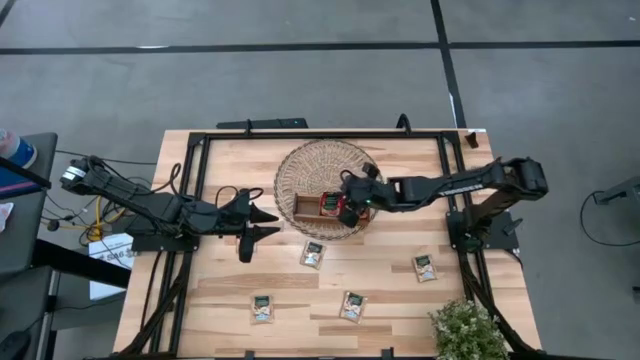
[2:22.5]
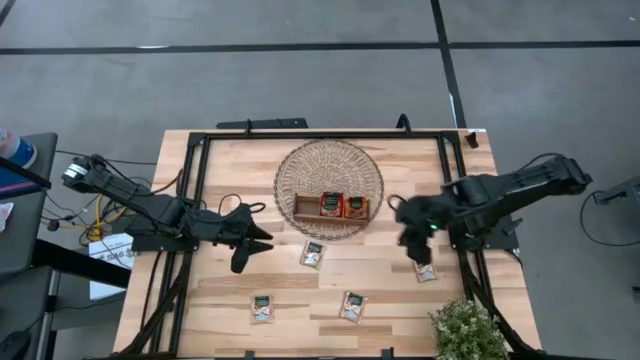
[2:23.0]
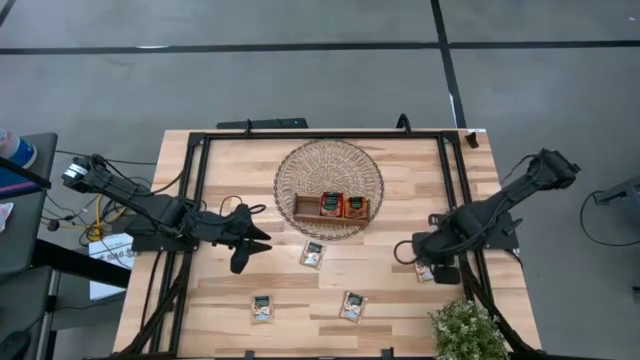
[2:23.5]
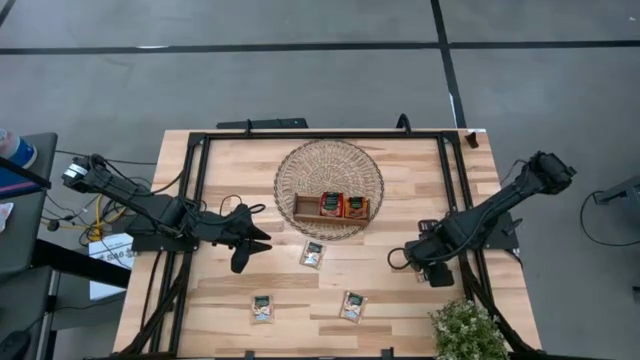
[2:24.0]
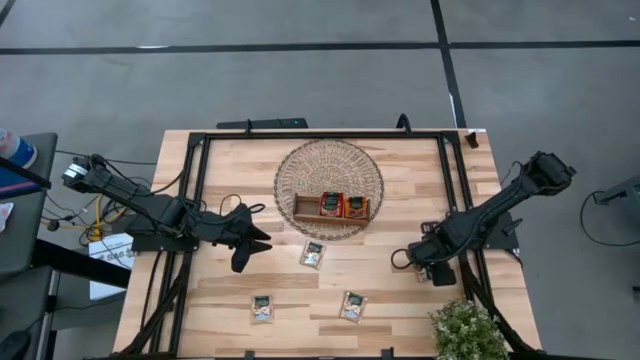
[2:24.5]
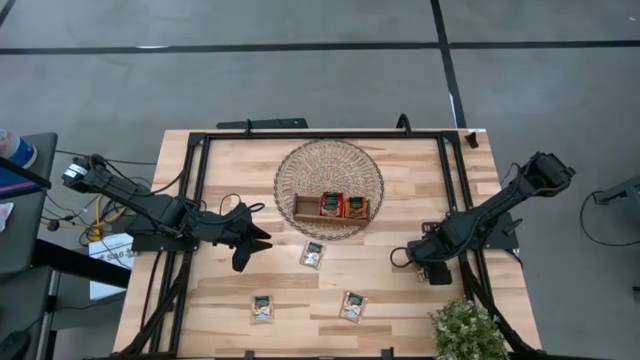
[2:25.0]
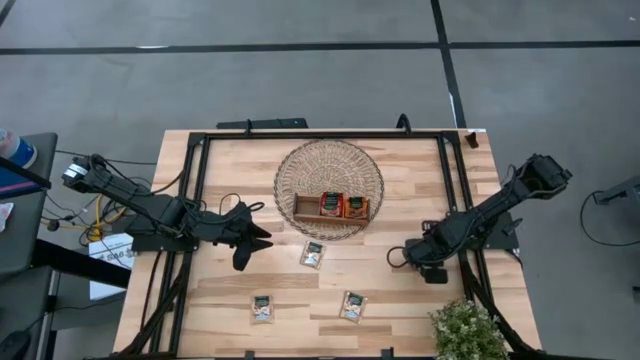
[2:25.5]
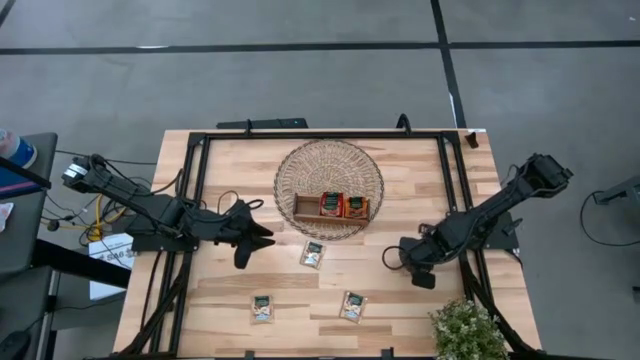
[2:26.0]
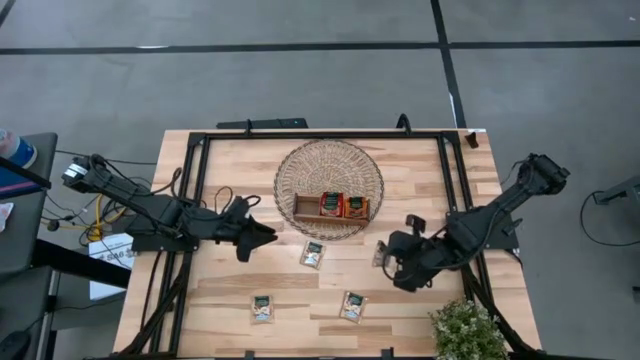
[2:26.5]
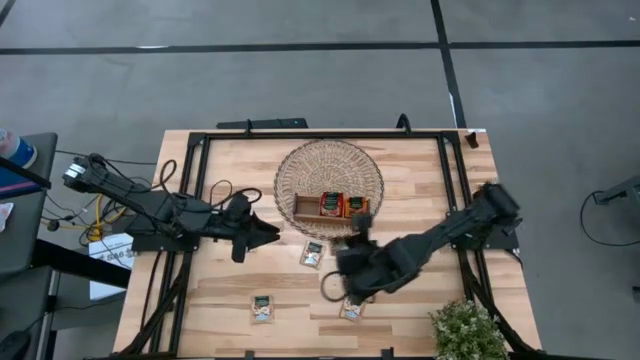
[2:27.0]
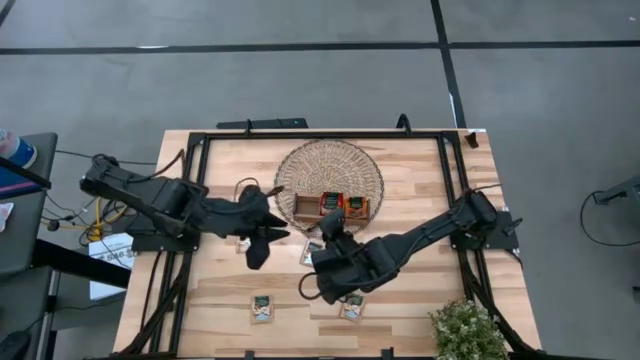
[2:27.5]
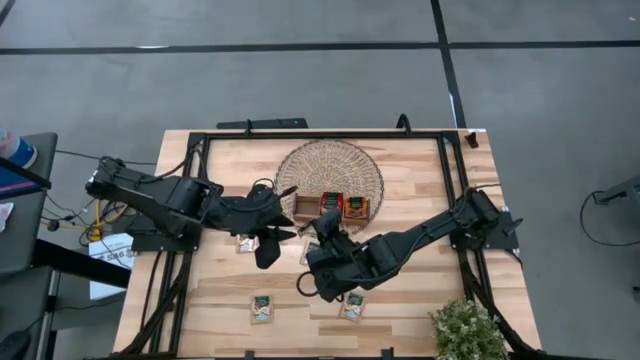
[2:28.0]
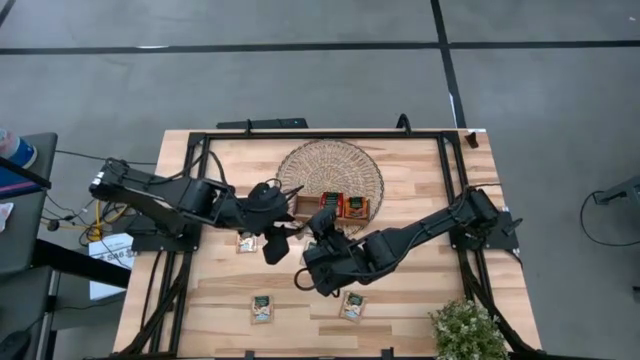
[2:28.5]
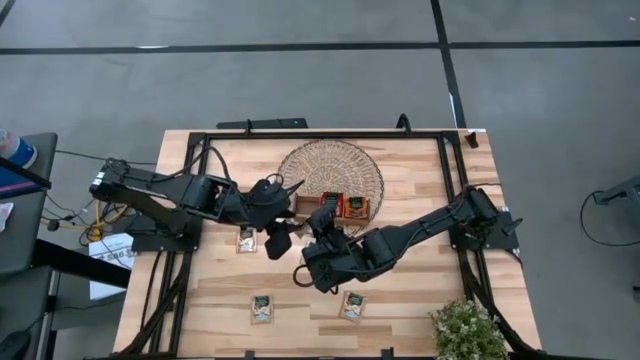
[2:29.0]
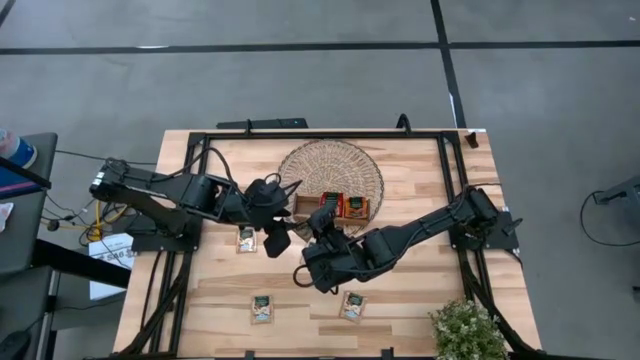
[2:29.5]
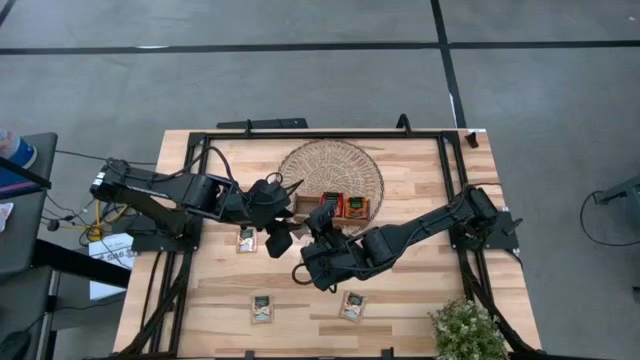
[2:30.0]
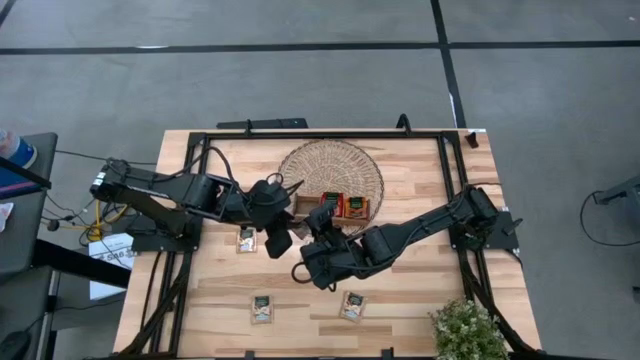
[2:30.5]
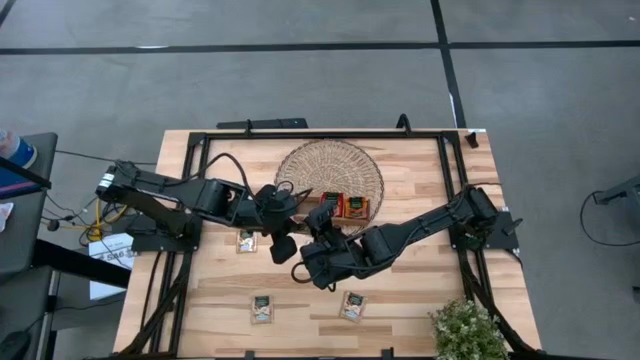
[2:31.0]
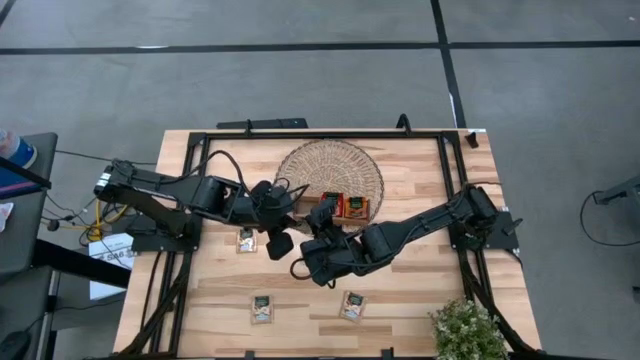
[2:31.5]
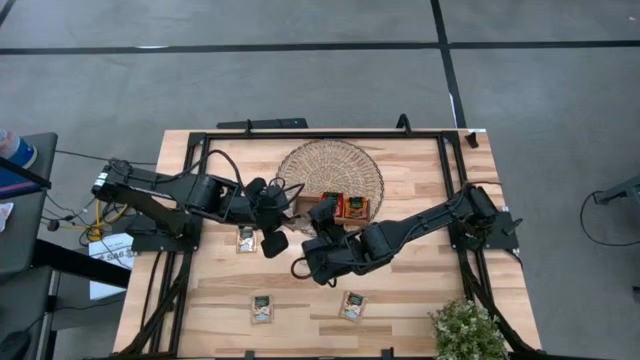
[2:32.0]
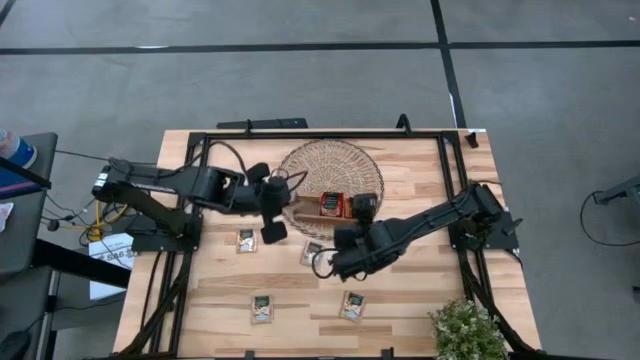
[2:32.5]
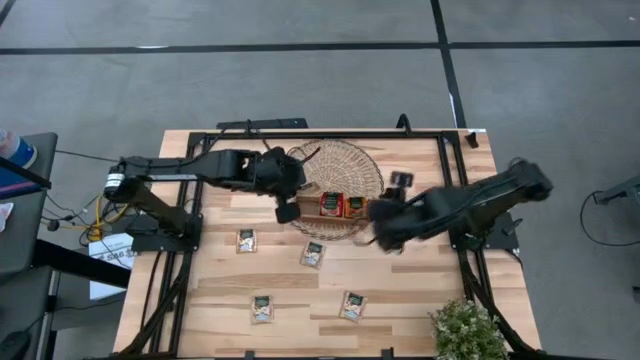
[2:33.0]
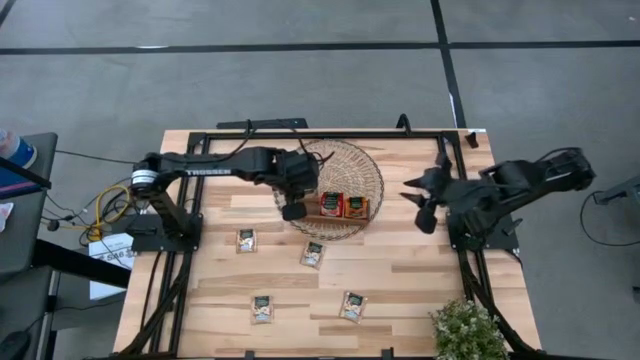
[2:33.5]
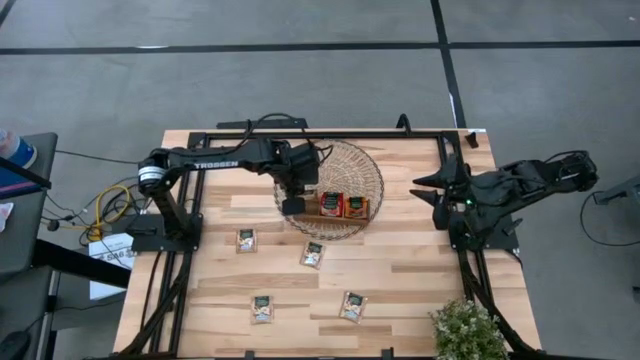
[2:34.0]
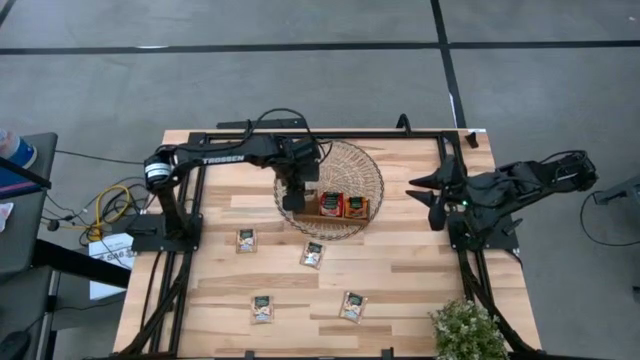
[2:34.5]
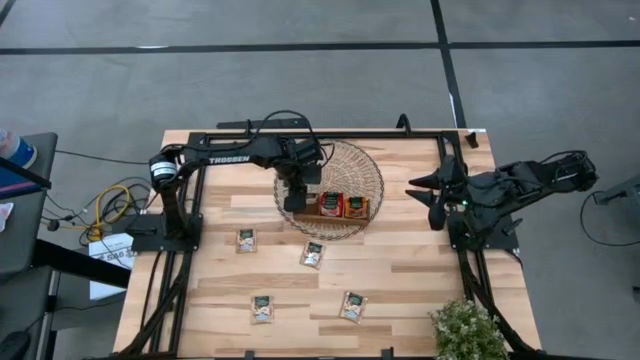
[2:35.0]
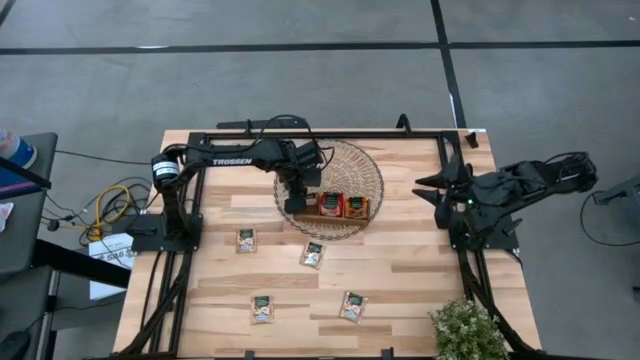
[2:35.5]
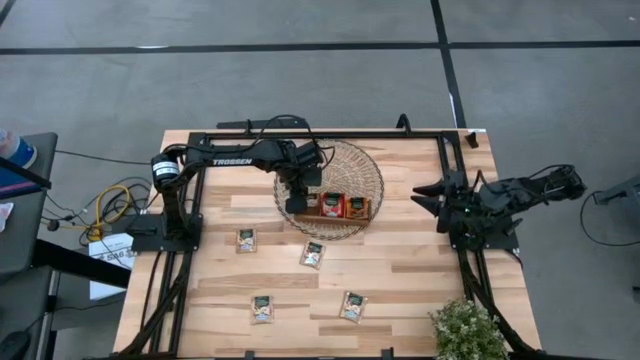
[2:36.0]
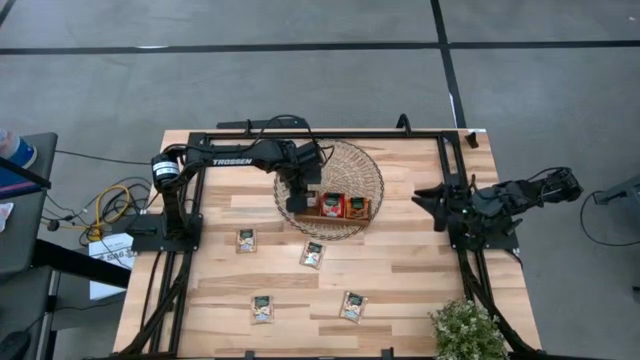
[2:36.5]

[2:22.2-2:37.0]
Task: Pick & Place Tea
Put the brown tea bag into the left section of the wooden organizer

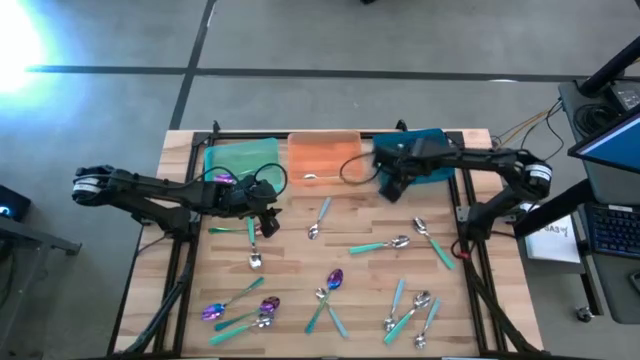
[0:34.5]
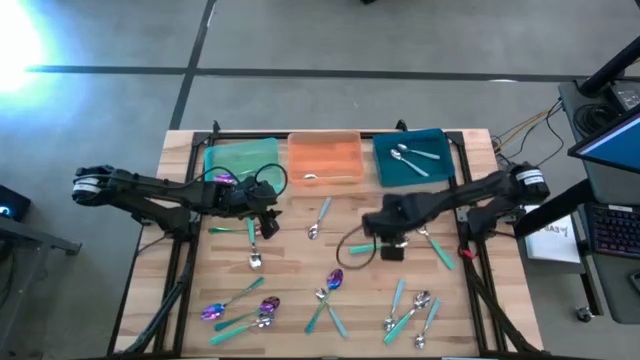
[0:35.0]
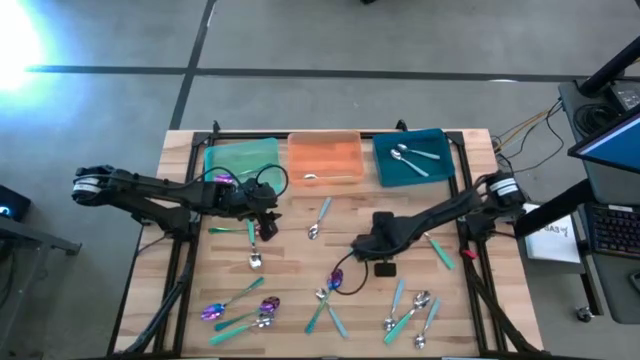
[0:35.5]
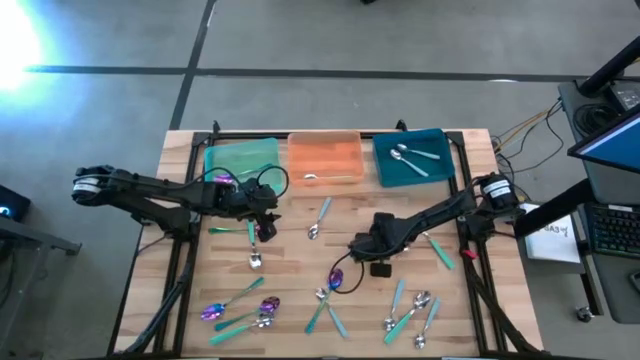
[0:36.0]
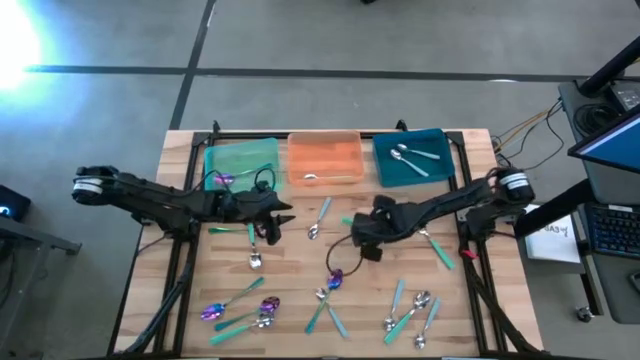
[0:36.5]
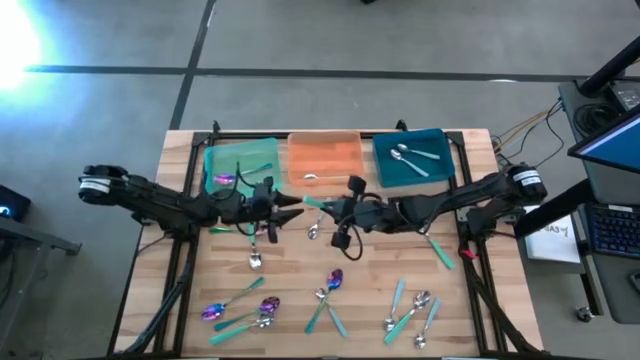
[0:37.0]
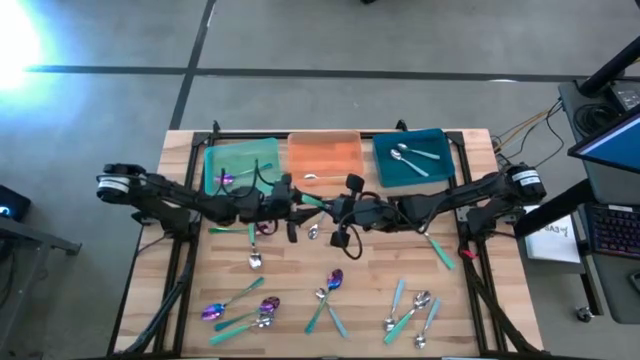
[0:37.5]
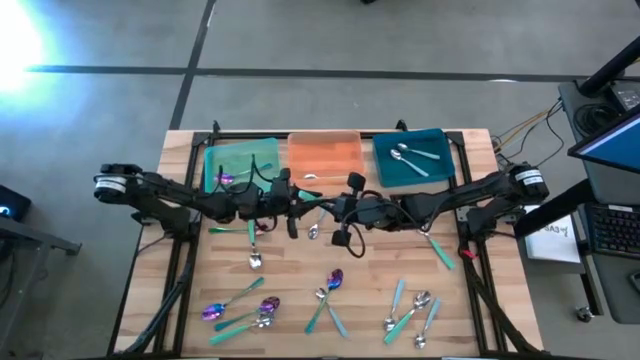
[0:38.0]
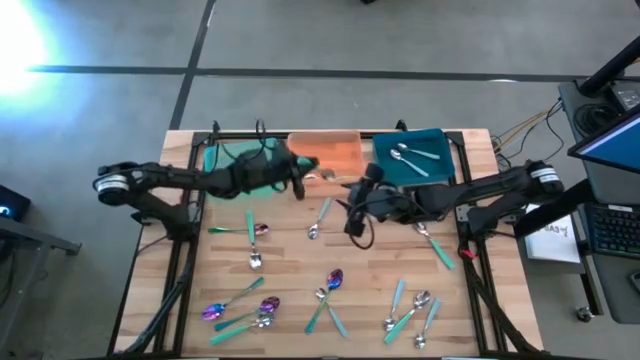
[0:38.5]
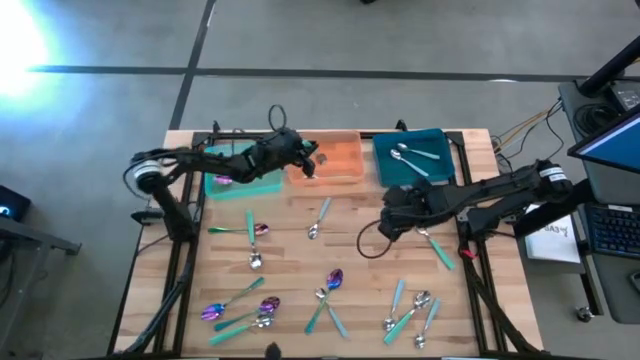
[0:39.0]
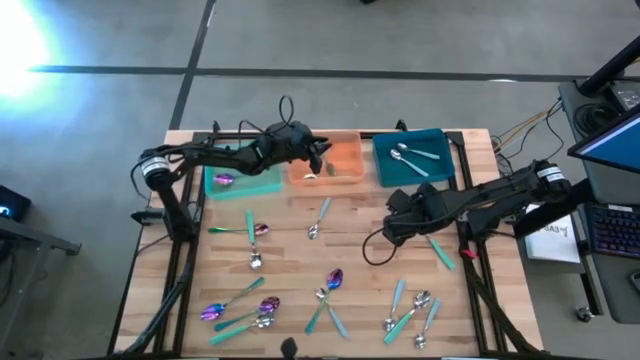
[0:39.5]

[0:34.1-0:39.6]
Task: Sort silverware by color (type)
Put the green spoon into the orange bin
